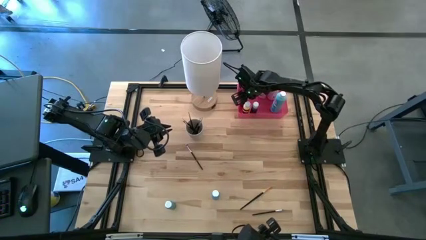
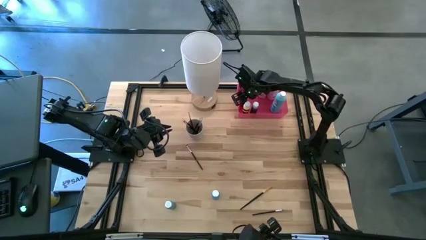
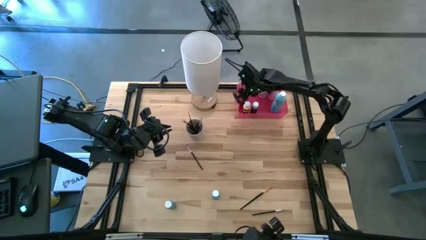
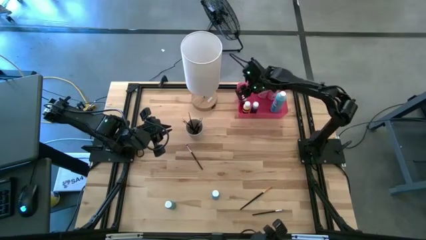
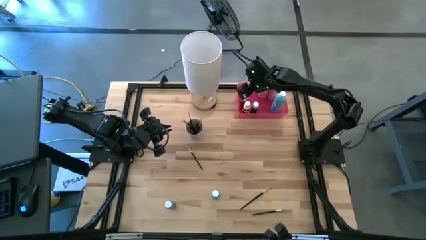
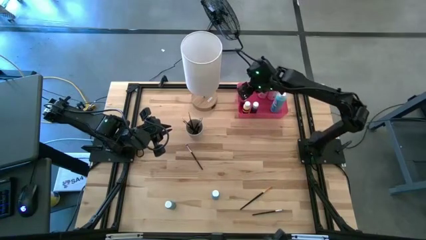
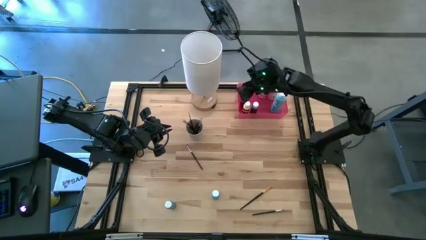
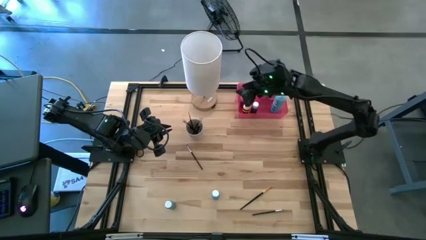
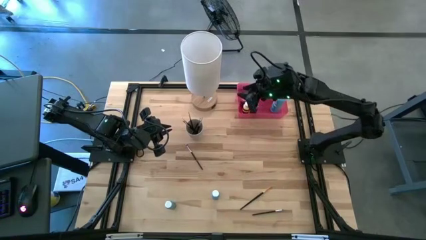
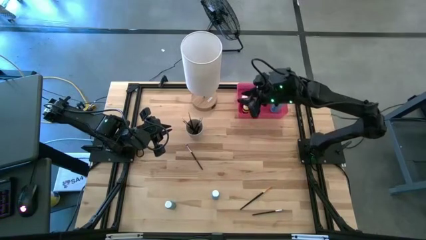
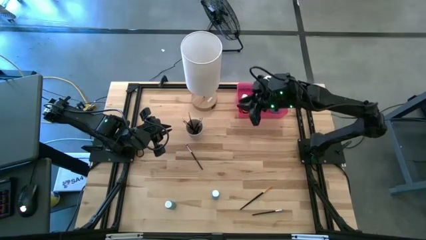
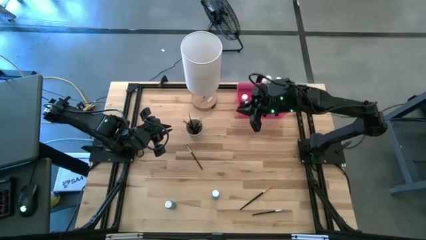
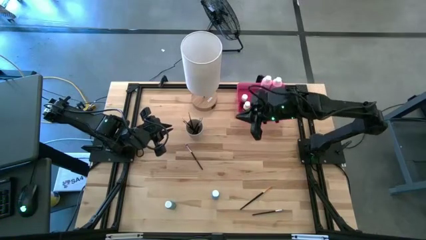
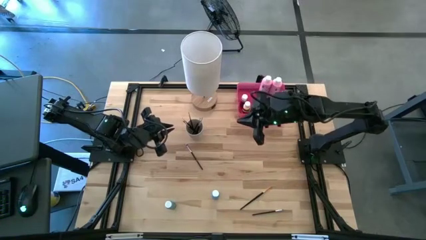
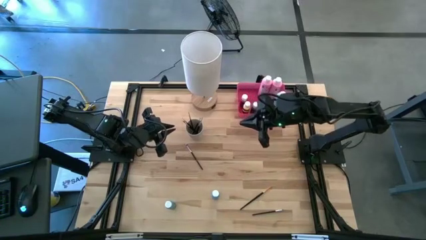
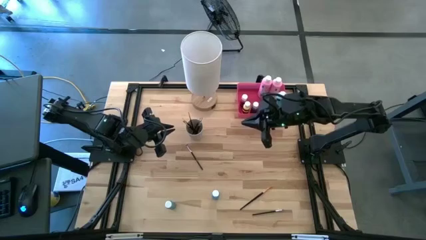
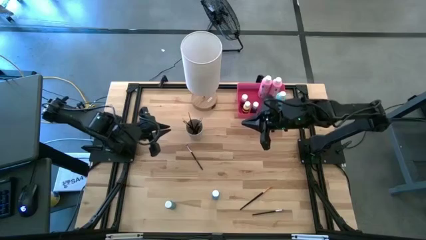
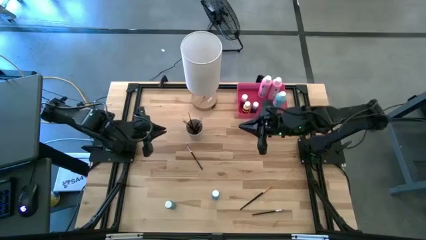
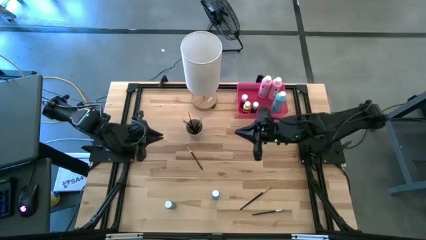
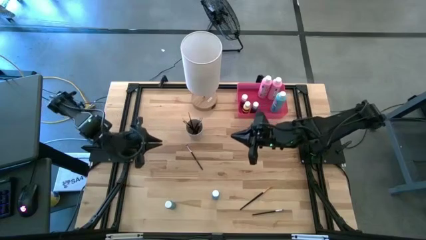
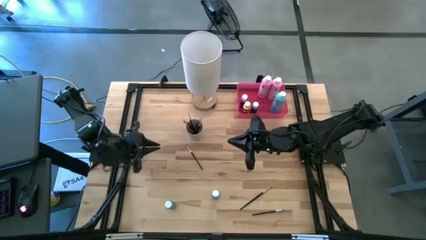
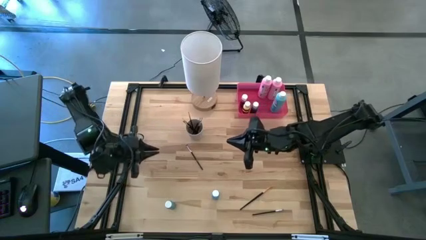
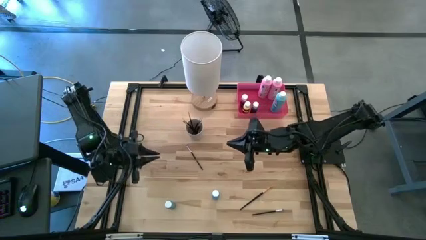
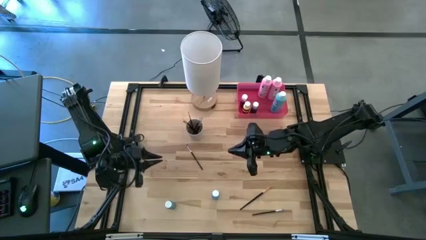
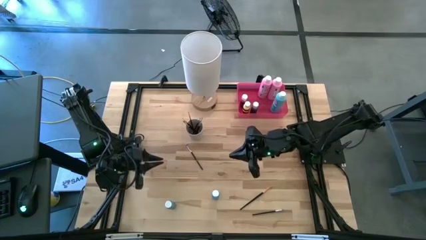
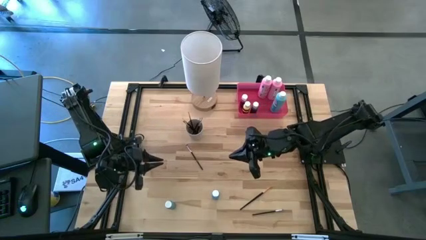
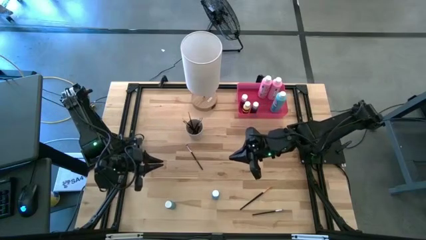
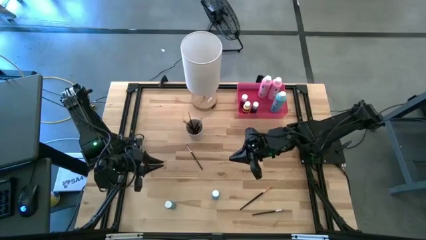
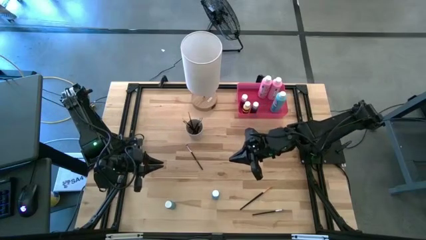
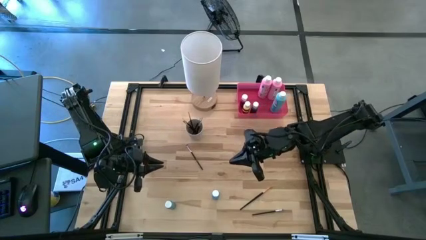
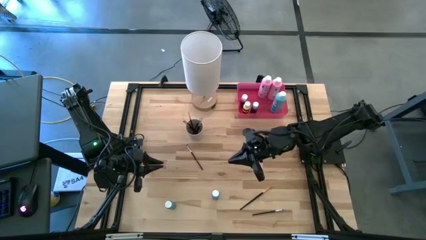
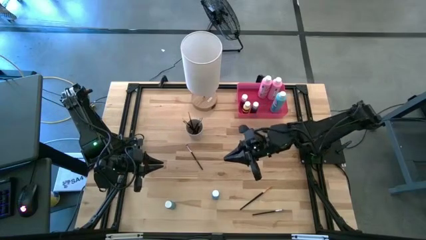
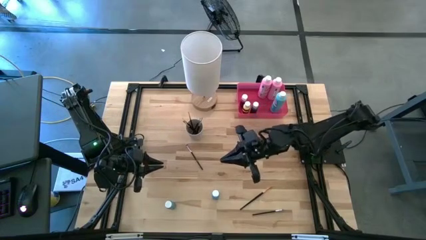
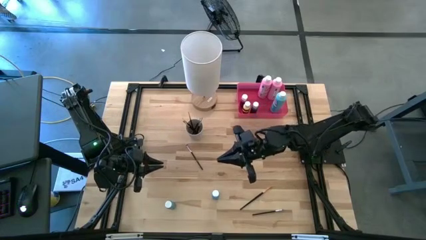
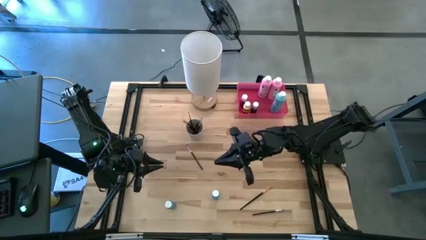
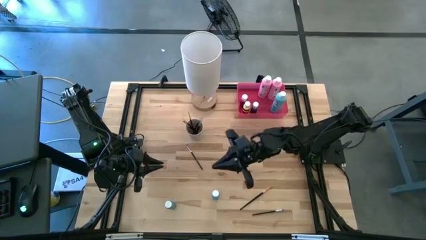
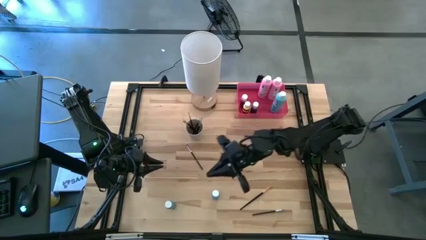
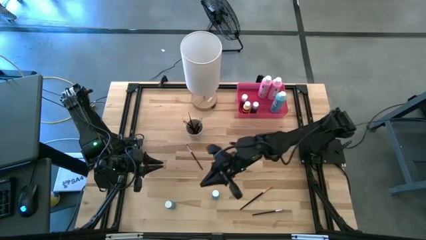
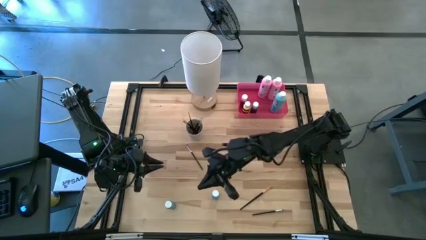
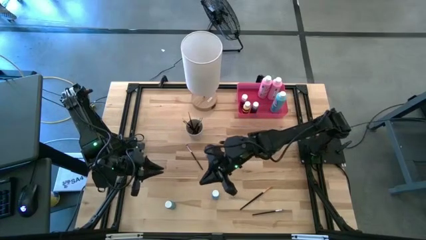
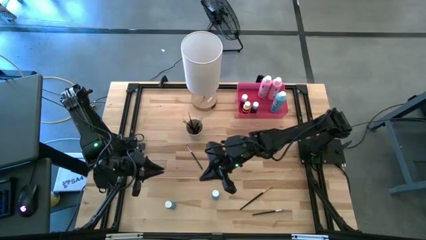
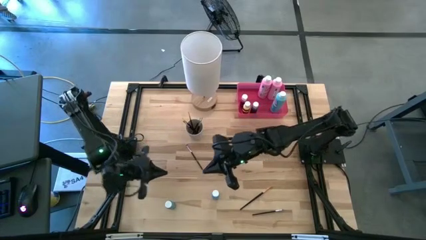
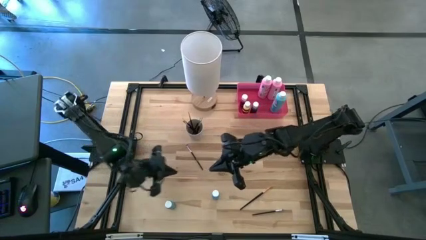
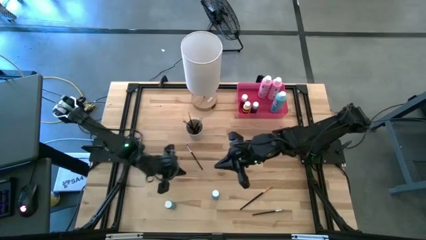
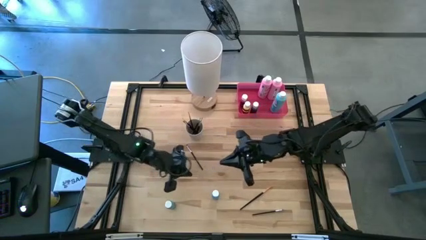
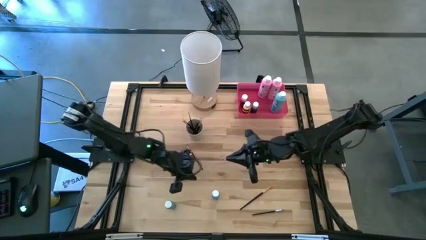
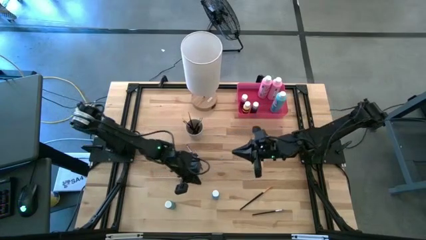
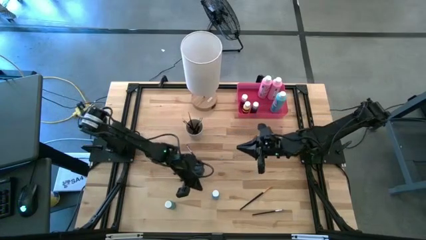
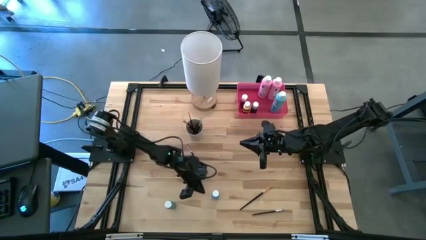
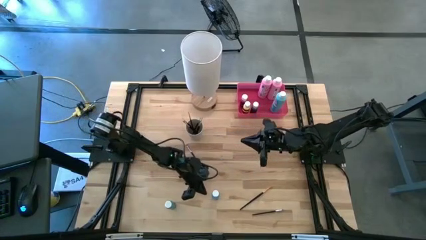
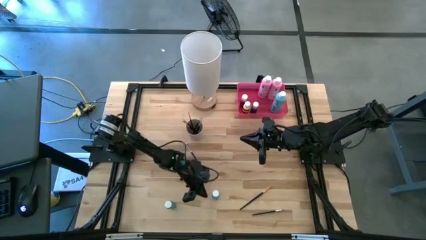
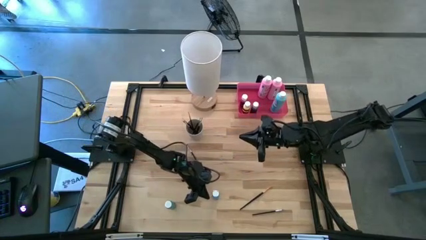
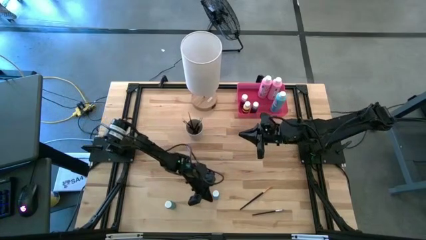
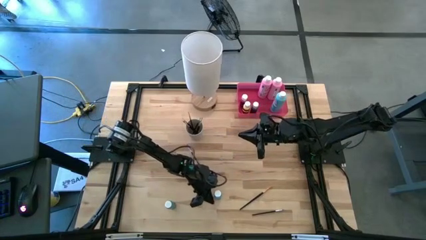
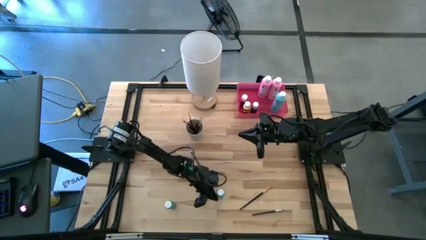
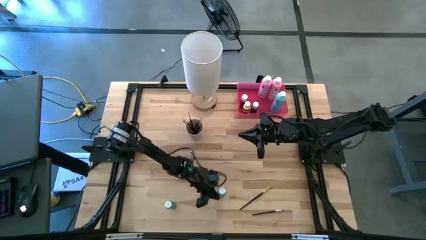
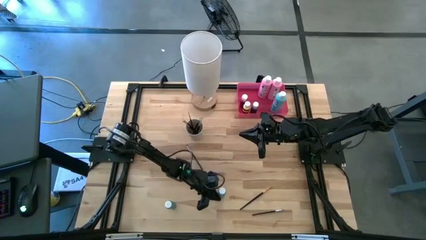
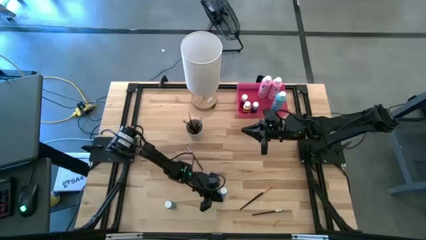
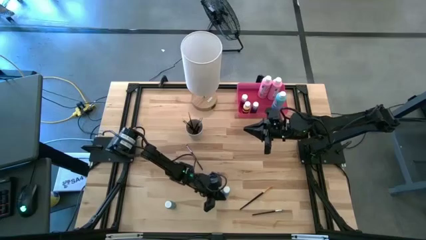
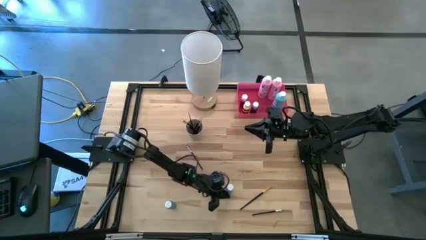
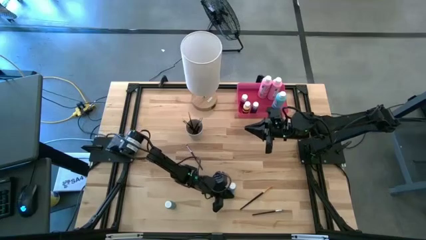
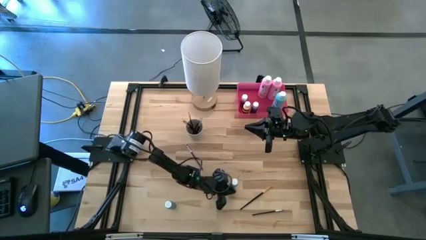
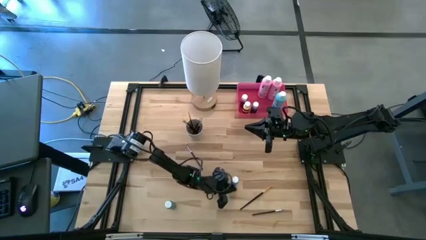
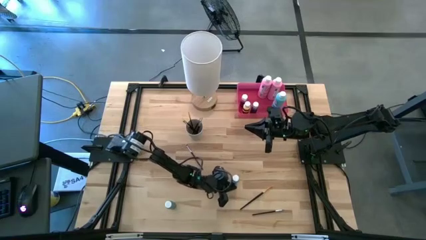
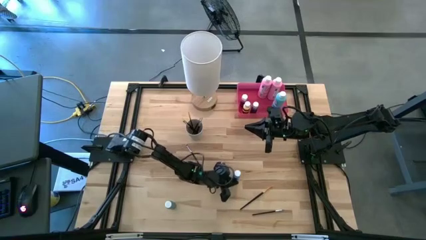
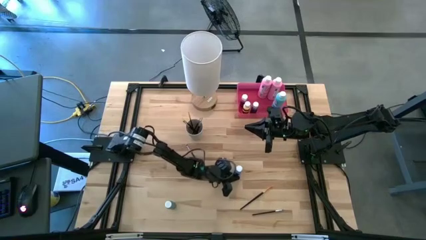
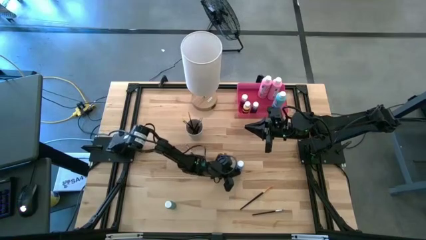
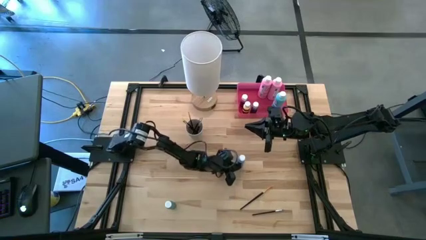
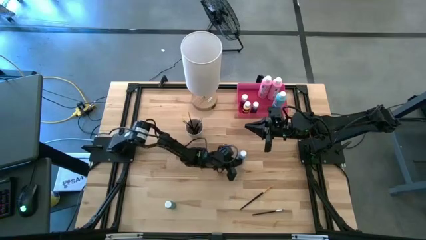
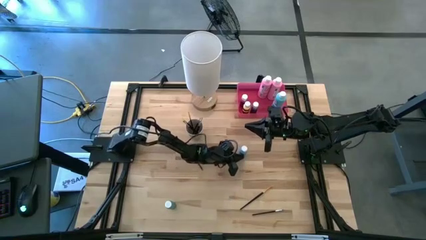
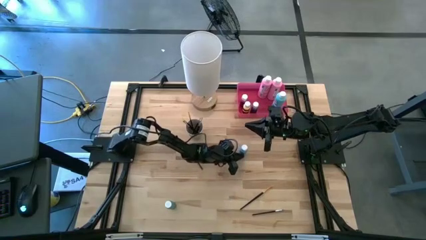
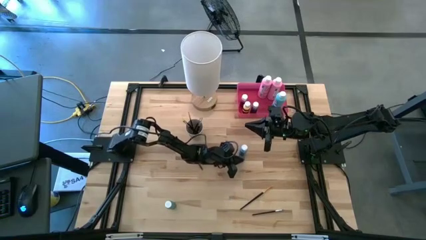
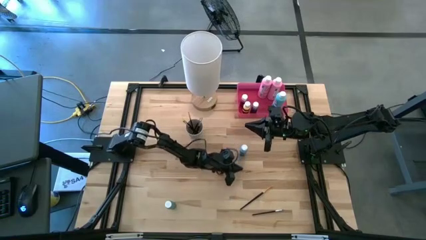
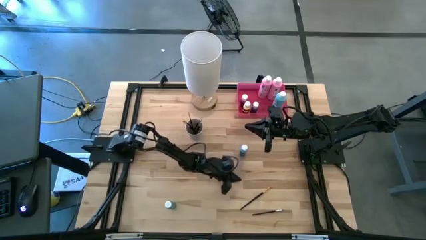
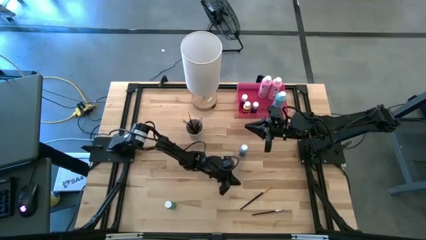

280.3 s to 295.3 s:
Task: Pick & Place Paint Supplies
Put the small blue paint bottle into the pink bin
